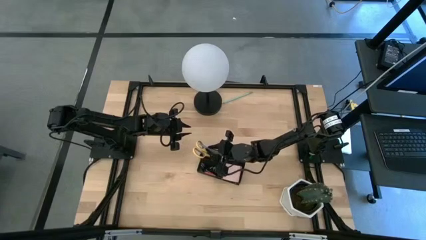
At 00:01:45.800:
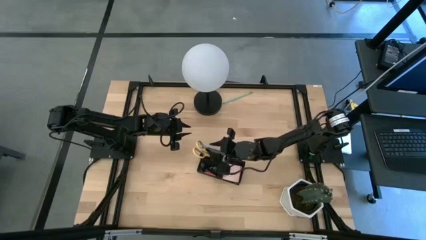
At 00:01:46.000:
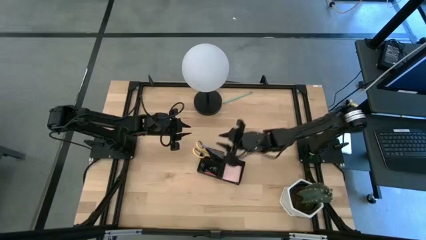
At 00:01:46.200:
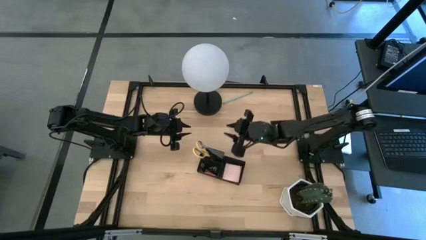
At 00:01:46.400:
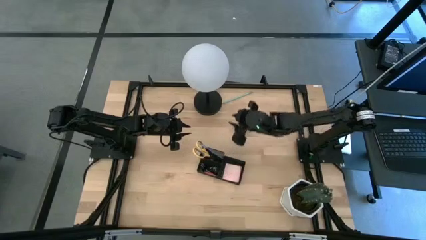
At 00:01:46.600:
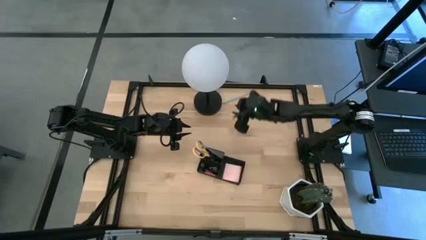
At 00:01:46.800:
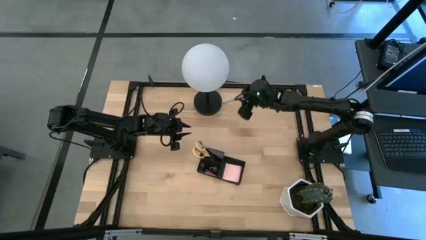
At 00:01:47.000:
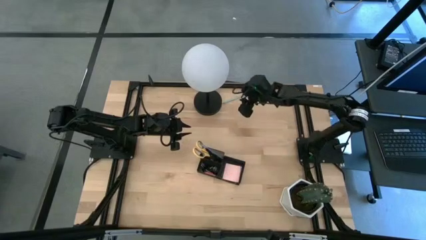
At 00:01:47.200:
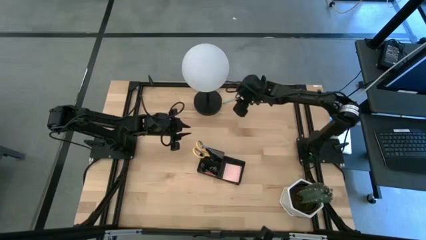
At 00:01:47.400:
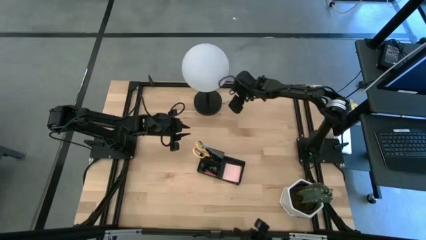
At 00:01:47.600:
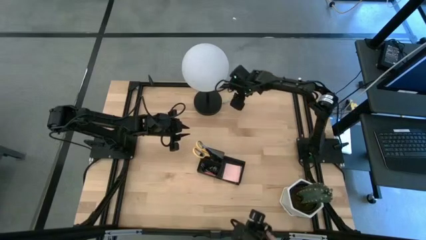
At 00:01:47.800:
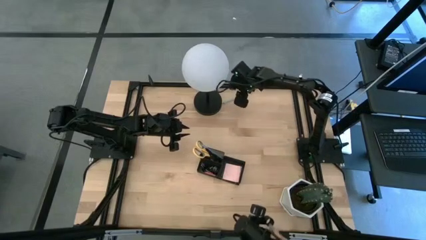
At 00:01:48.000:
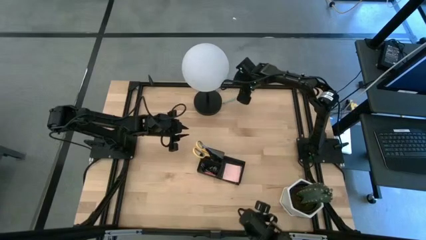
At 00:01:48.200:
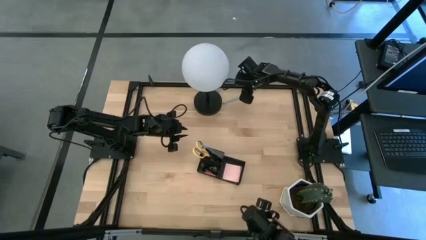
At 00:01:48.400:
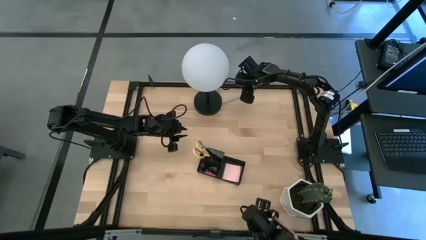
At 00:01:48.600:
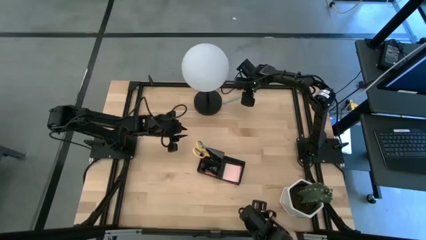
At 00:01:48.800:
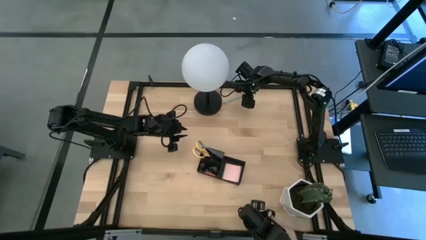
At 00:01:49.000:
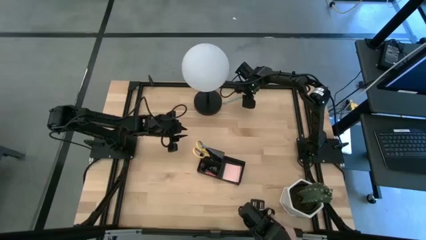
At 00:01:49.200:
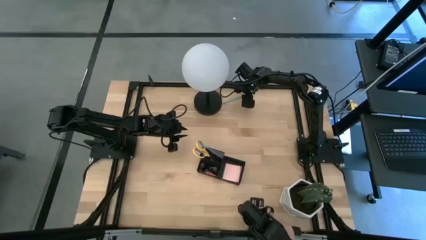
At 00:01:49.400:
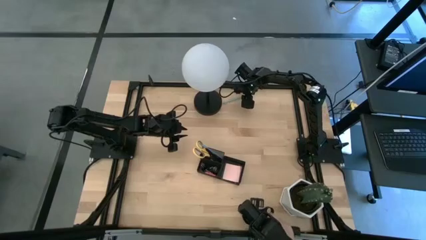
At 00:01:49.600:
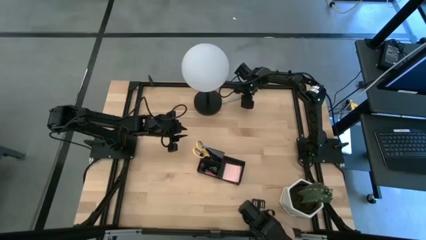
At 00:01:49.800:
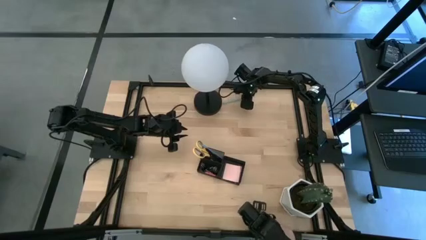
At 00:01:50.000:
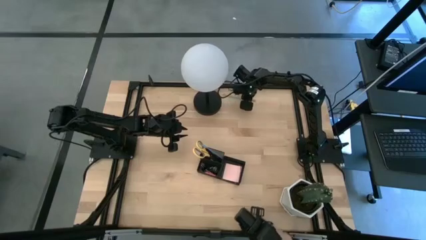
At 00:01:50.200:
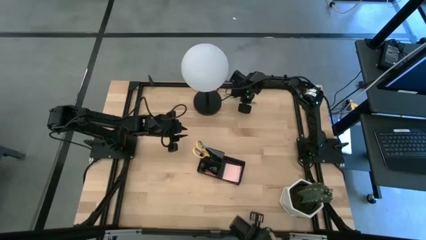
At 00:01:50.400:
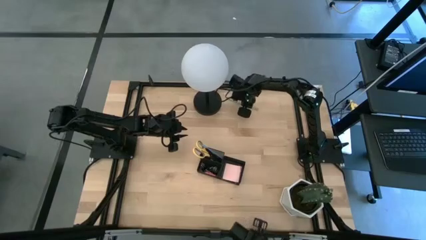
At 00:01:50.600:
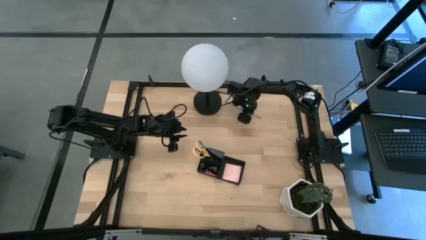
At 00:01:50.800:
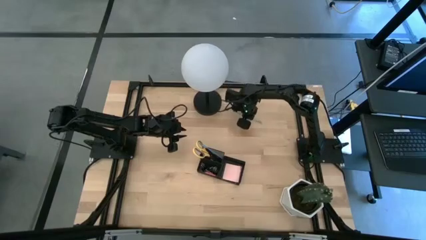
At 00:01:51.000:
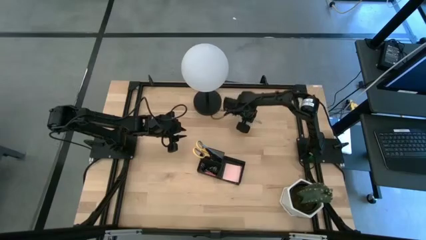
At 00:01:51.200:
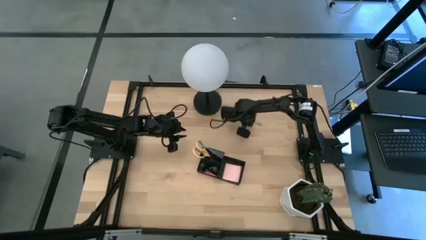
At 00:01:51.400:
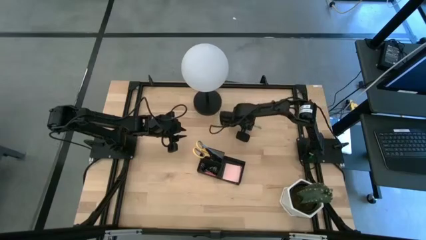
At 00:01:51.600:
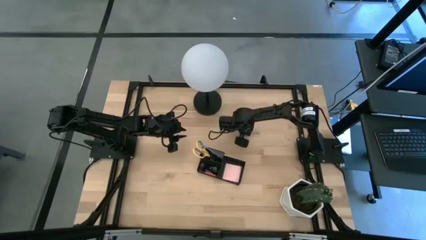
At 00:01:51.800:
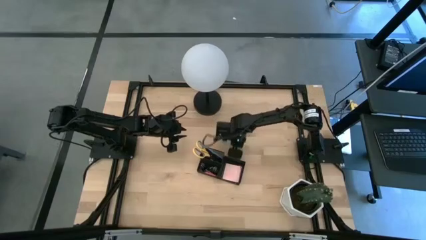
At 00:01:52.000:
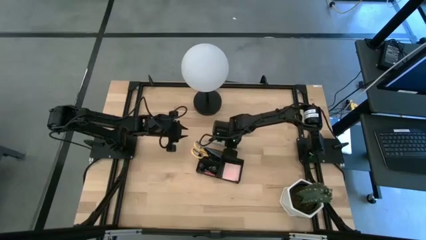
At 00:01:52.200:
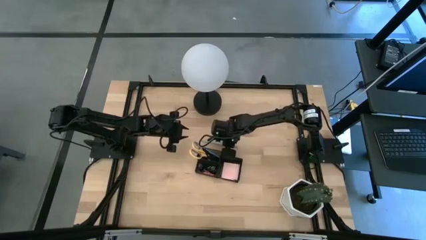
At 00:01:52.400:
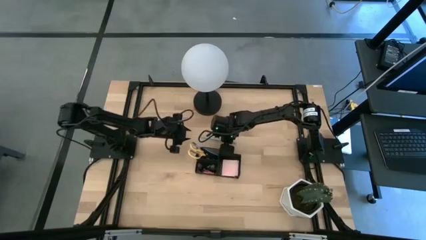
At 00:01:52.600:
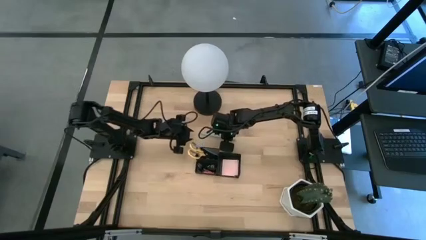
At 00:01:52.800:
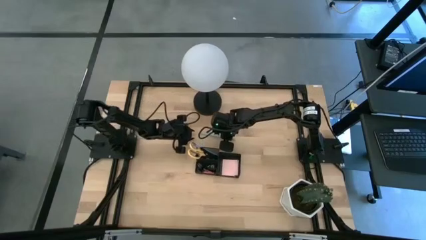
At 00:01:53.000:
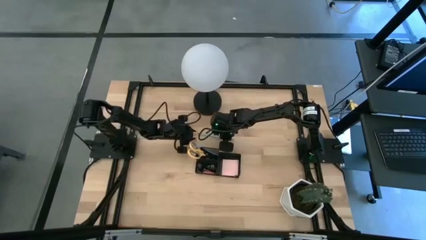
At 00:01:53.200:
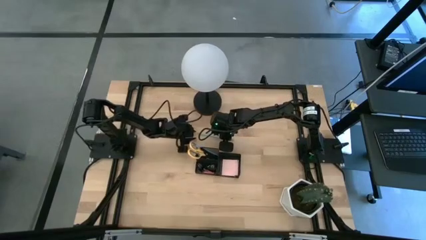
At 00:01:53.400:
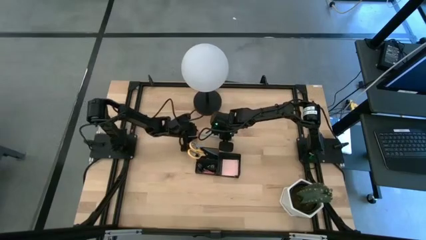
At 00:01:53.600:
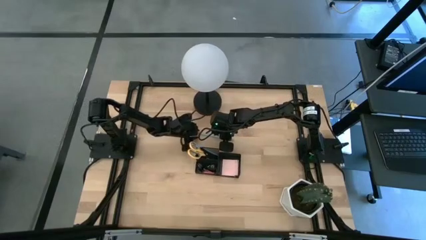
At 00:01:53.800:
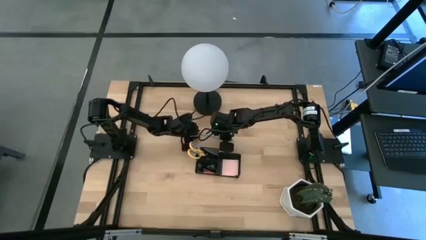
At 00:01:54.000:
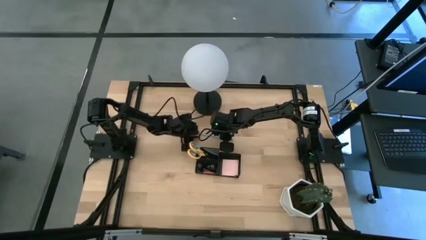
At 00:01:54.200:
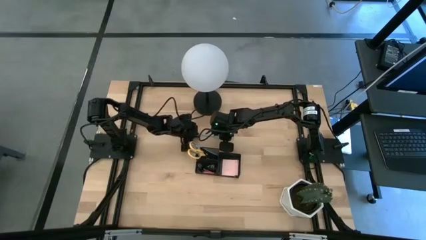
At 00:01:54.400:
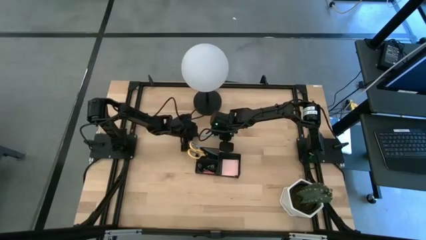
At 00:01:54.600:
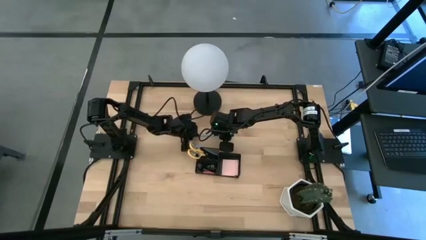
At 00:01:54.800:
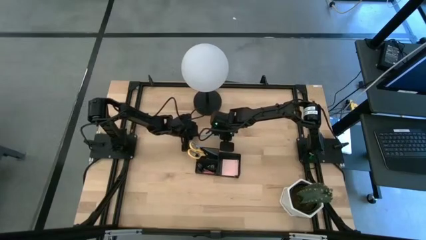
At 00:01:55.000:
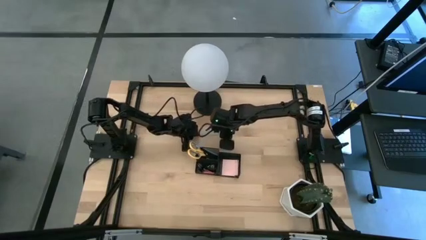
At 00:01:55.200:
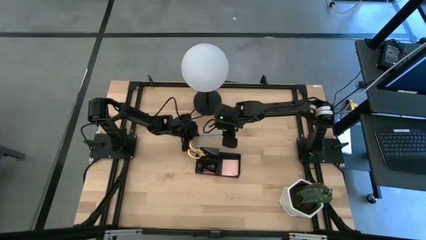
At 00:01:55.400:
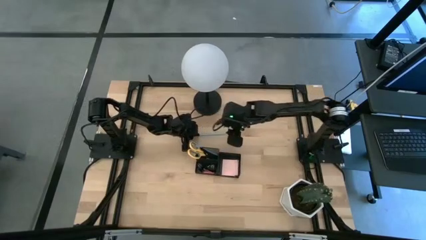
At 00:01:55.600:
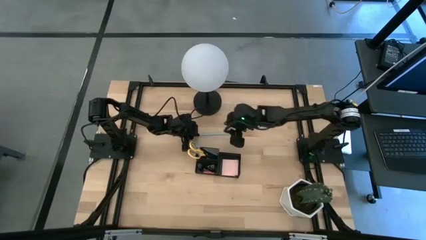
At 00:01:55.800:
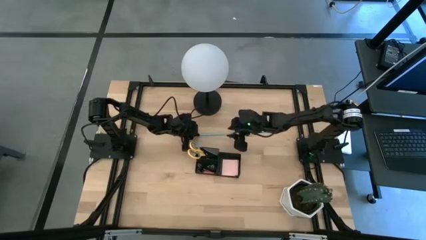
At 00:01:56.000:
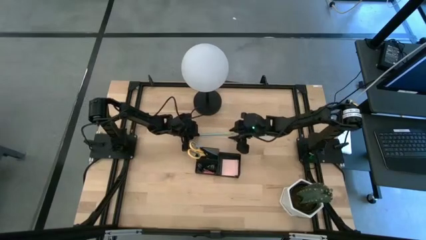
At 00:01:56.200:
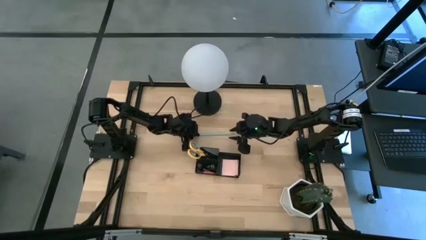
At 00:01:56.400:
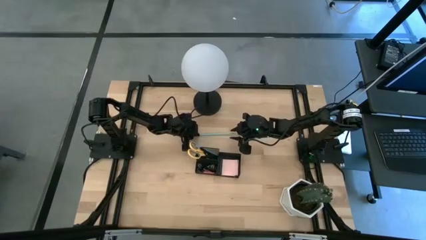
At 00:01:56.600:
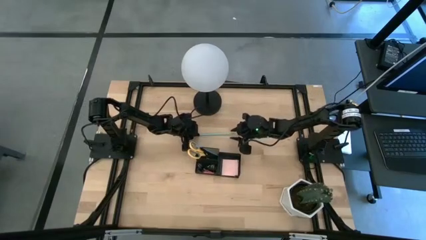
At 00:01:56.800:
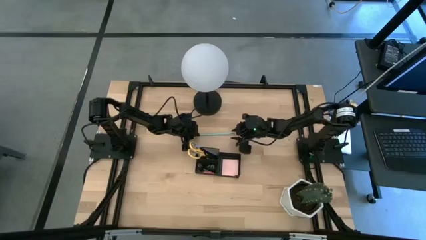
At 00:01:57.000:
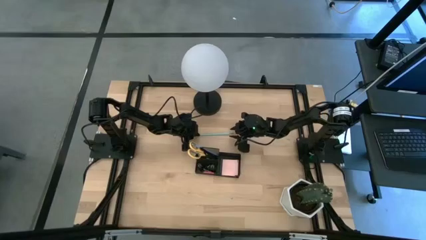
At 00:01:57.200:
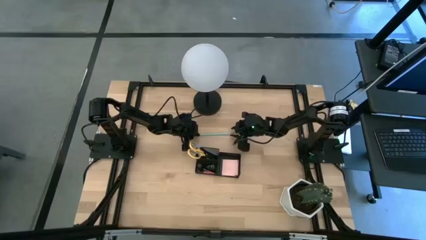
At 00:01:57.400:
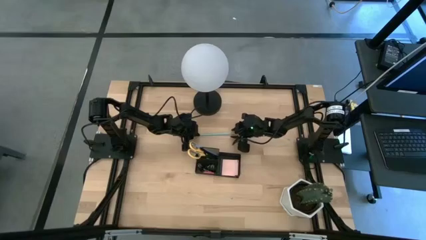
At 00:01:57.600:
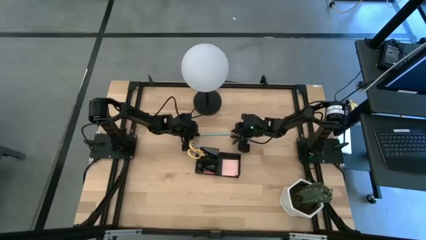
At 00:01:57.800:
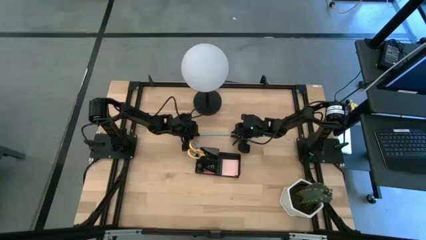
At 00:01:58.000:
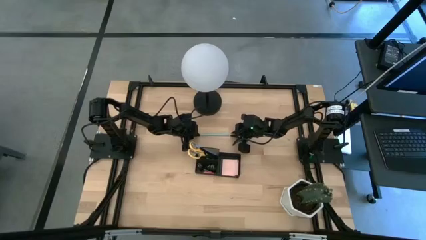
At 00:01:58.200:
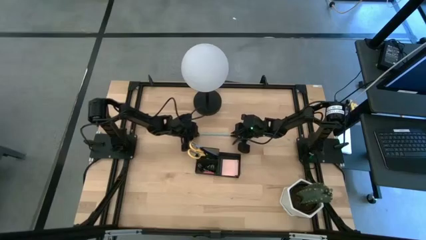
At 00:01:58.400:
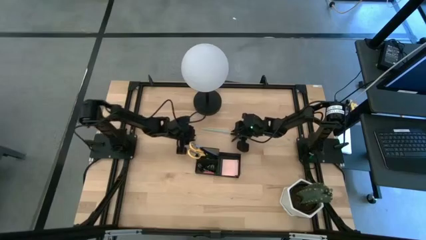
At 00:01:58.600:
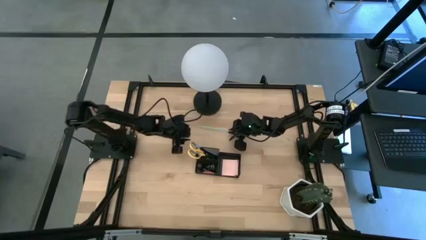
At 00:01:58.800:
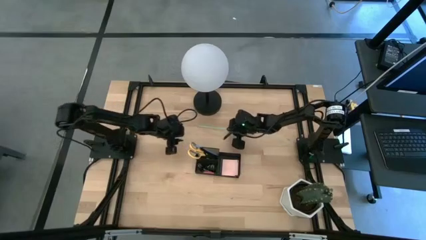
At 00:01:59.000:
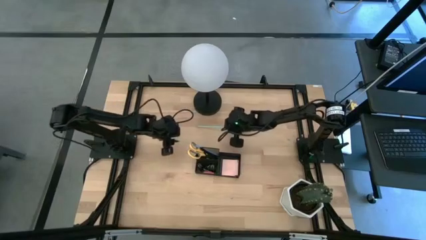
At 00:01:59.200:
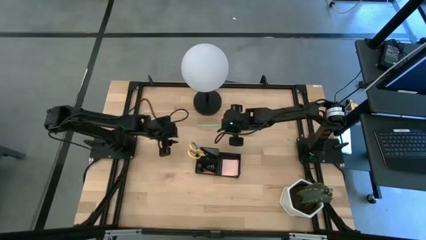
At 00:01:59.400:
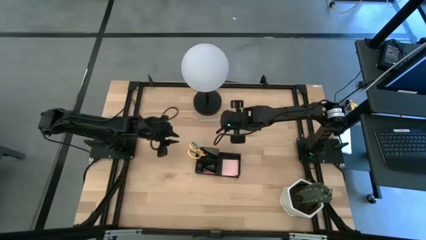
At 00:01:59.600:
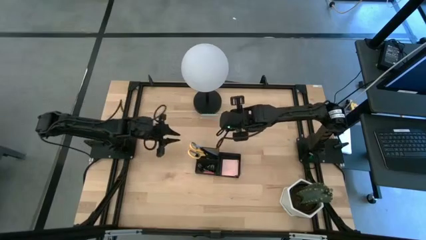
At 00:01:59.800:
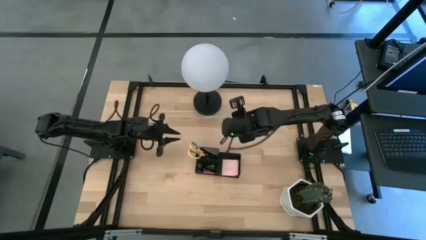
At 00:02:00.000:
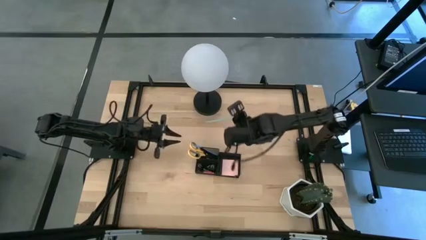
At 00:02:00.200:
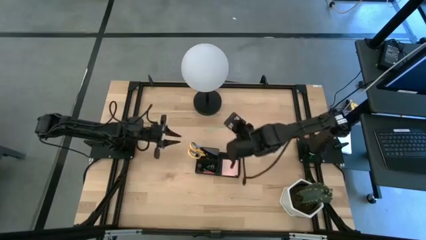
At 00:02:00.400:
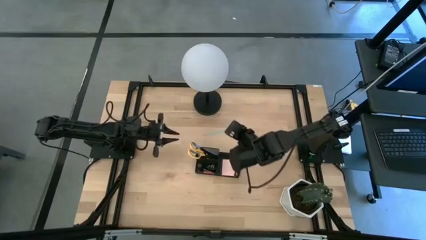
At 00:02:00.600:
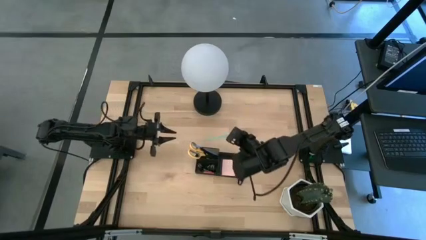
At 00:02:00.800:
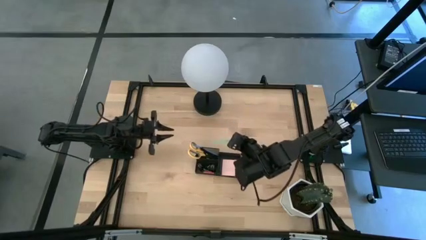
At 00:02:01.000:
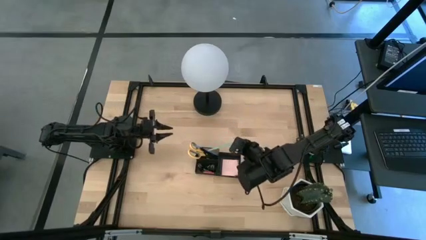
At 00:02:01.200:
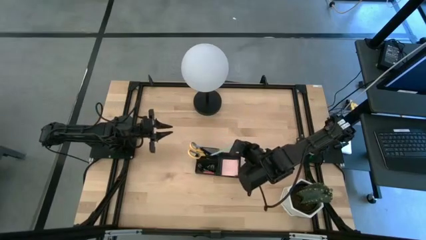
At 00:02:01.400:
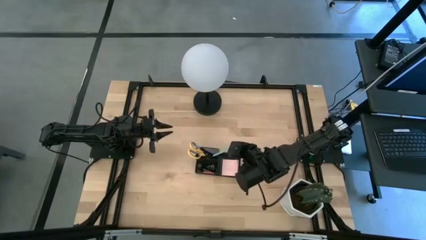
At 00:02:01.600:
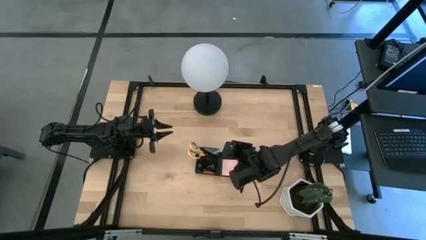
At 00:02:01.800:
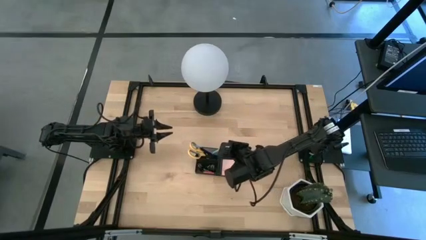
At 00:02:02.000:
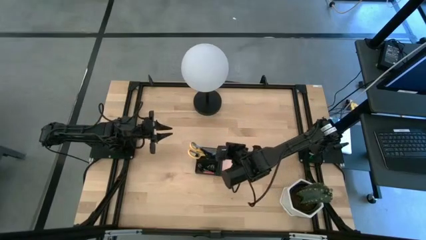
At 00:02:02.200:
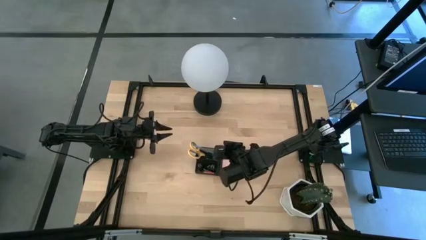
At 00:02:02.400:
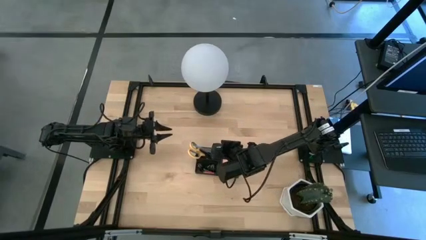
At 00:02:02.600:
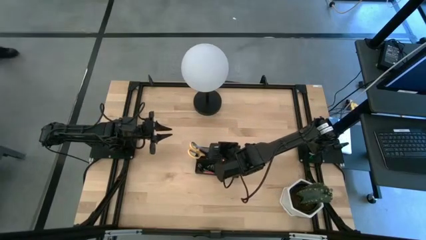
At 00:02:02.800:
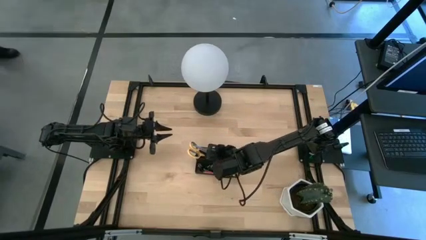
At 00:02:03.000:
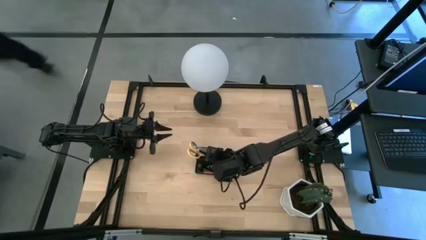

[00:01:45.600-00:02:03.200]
Task: Pick and place office supplies into organizer
Put the light blue pencil into the black desk organizer
